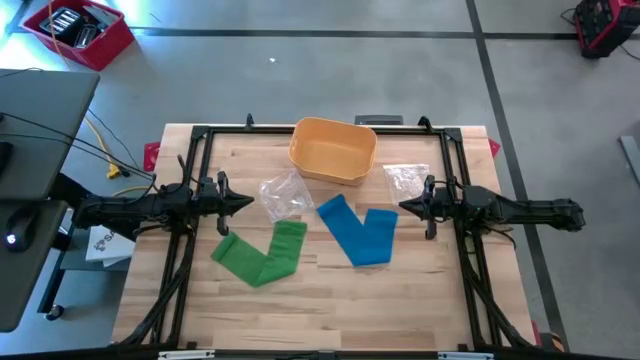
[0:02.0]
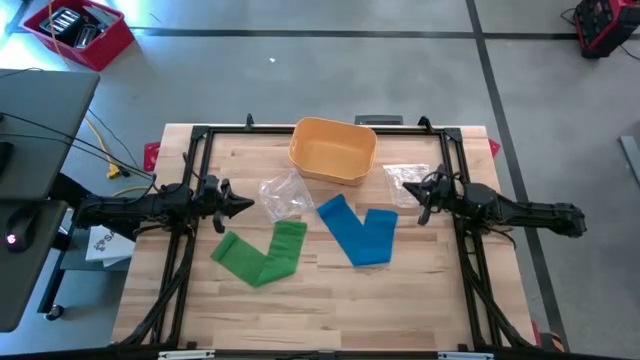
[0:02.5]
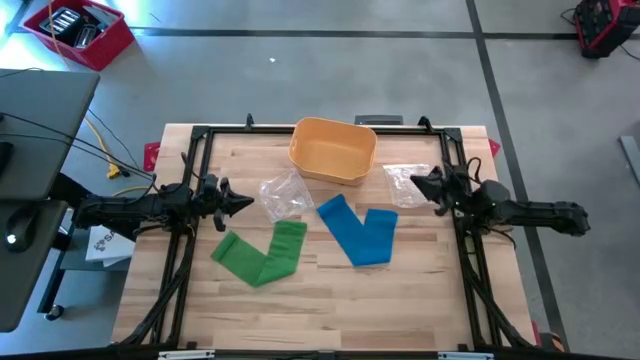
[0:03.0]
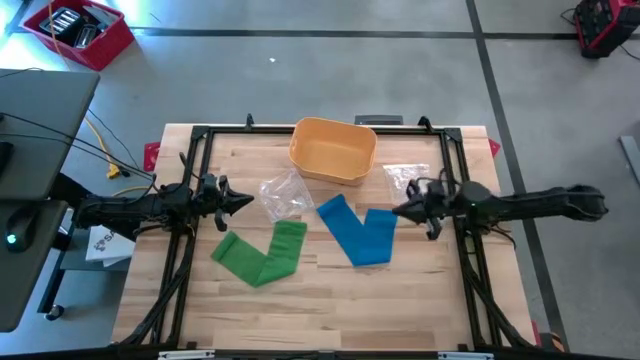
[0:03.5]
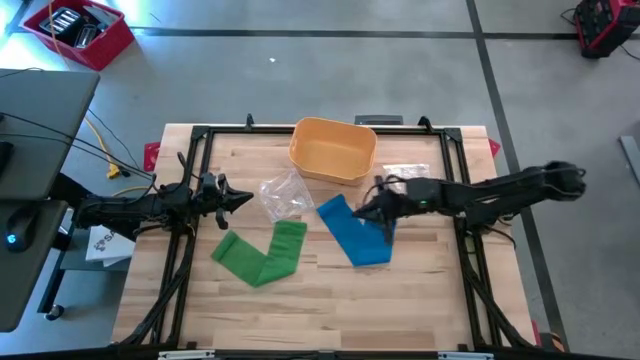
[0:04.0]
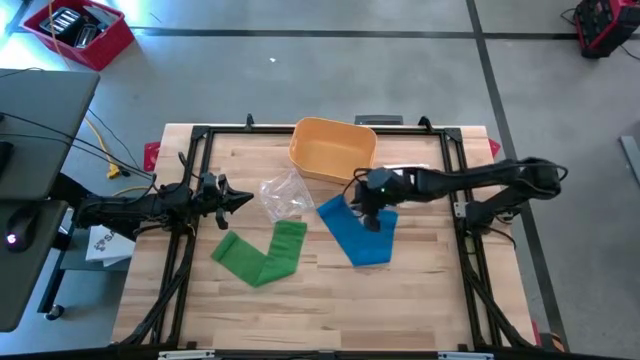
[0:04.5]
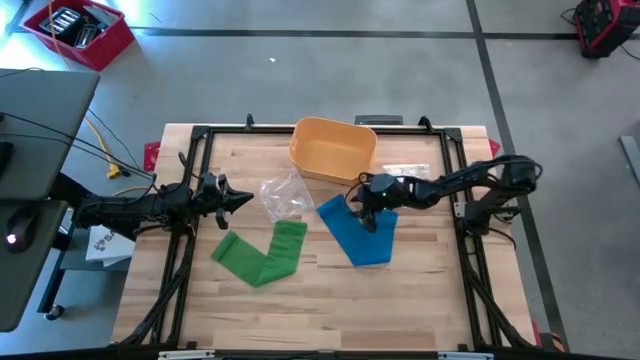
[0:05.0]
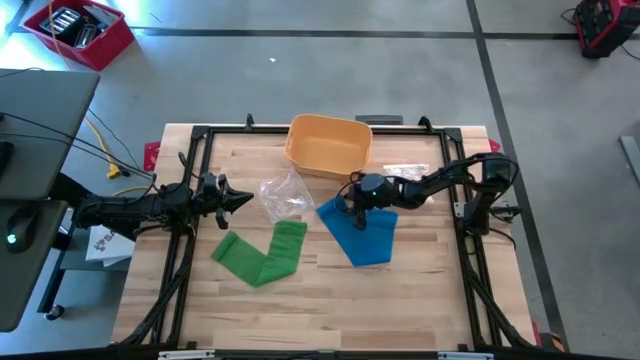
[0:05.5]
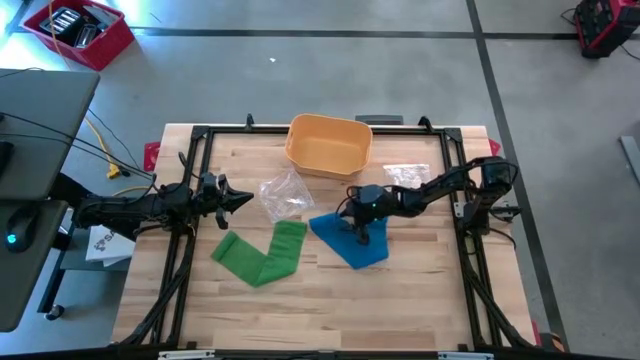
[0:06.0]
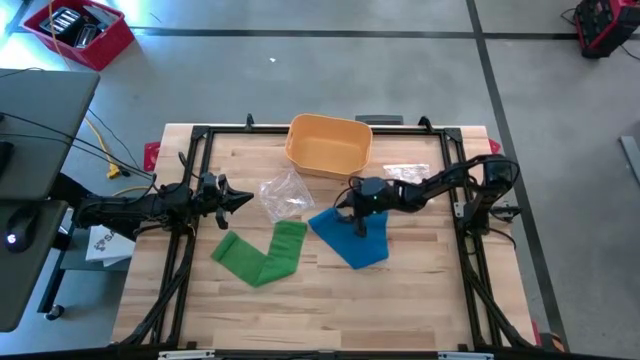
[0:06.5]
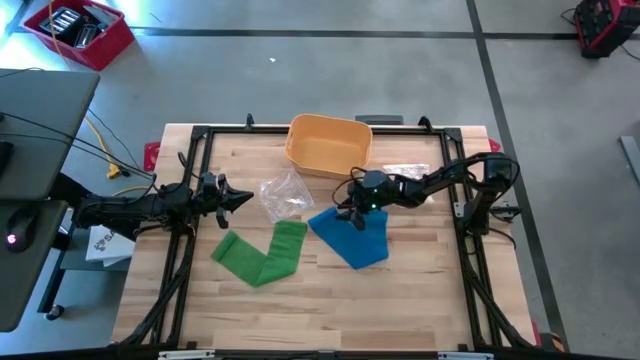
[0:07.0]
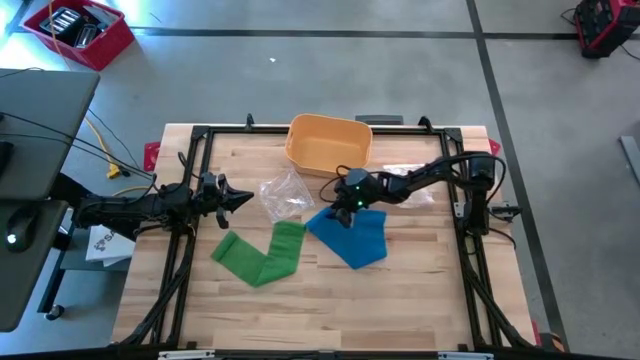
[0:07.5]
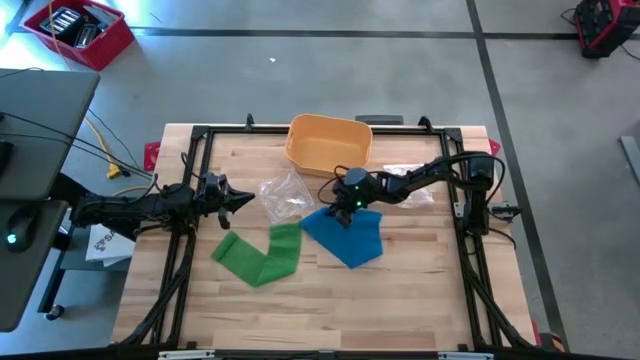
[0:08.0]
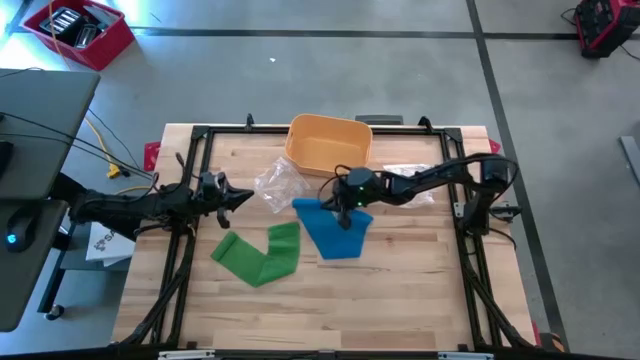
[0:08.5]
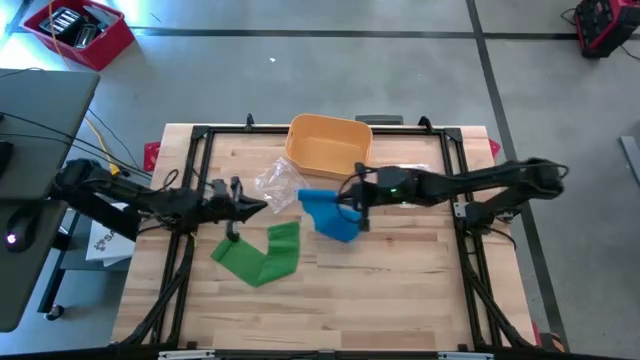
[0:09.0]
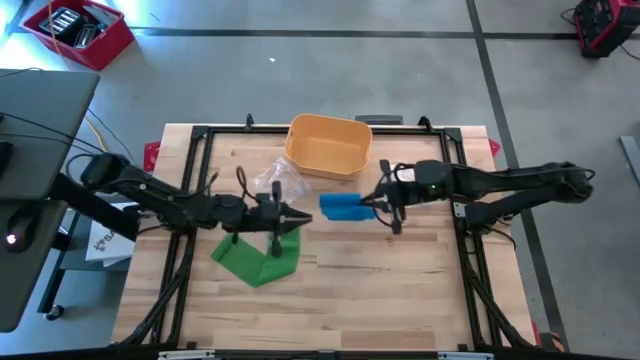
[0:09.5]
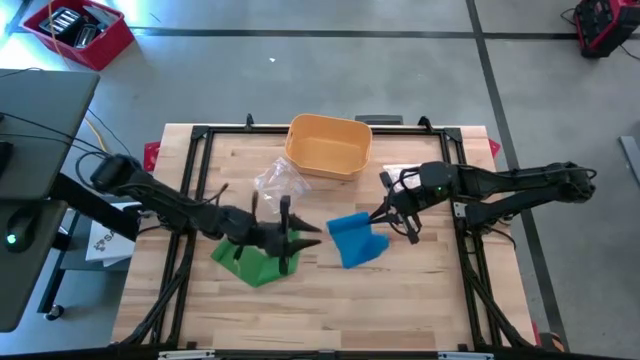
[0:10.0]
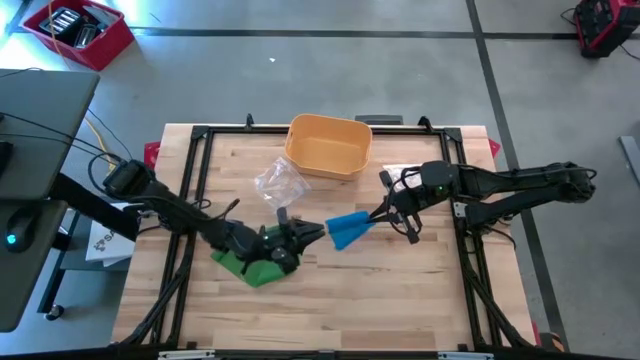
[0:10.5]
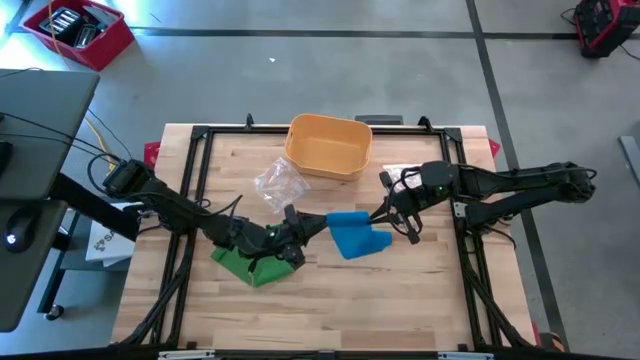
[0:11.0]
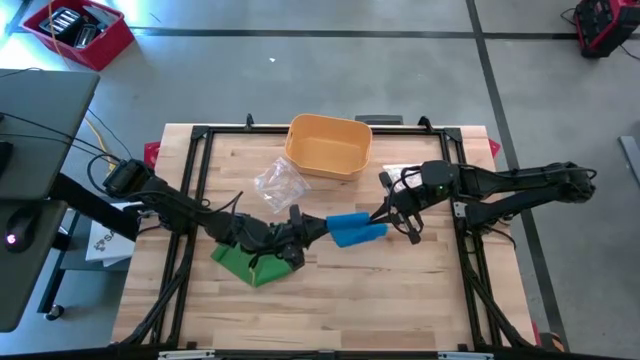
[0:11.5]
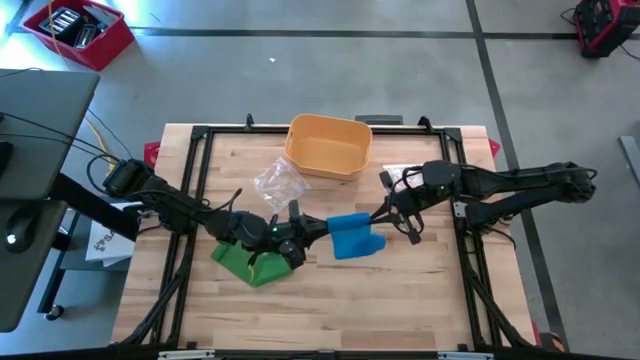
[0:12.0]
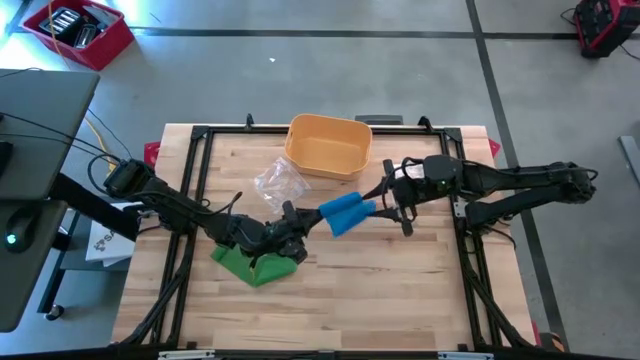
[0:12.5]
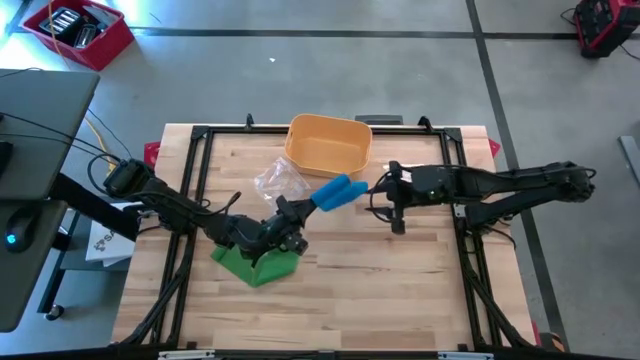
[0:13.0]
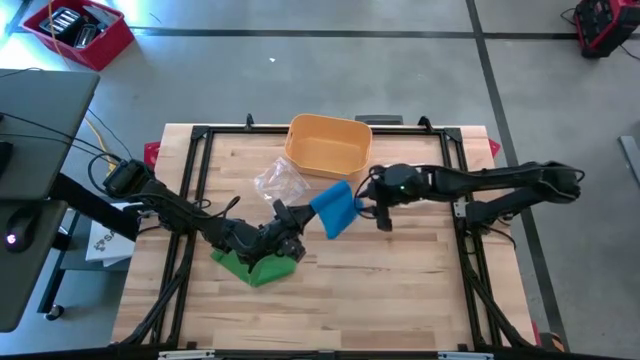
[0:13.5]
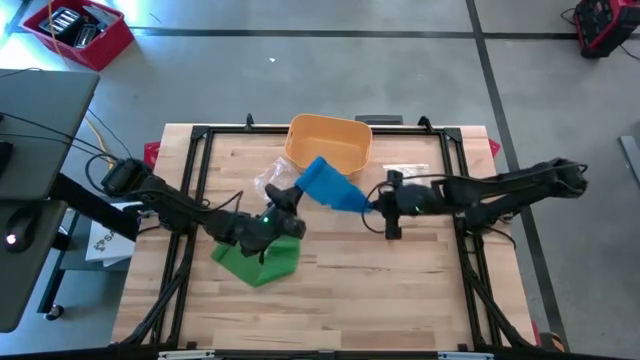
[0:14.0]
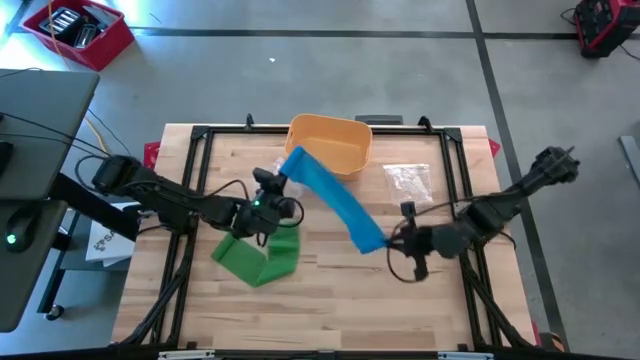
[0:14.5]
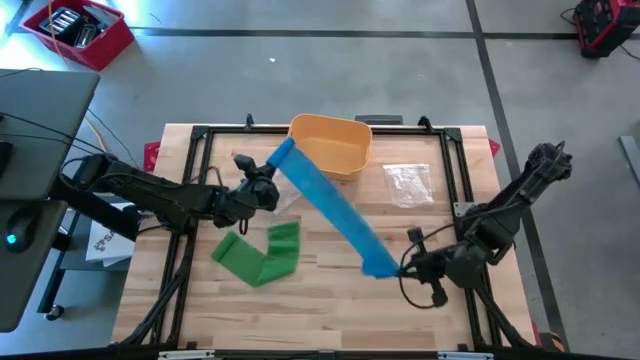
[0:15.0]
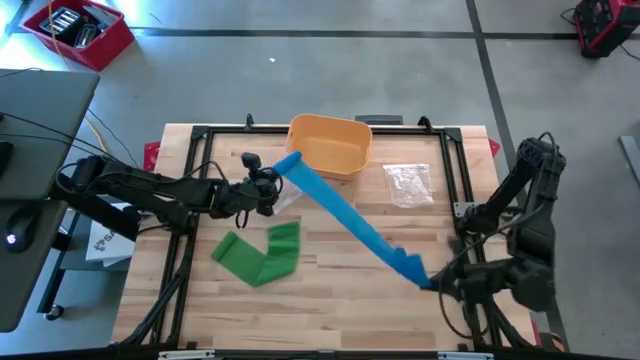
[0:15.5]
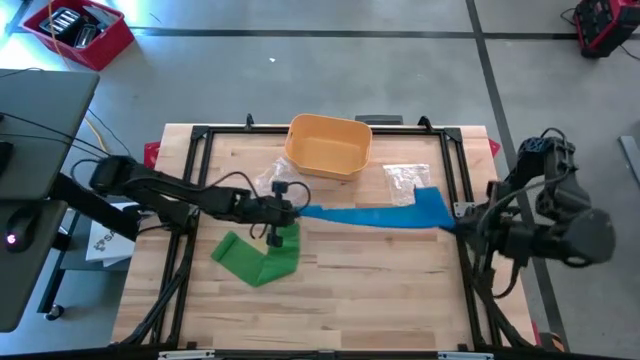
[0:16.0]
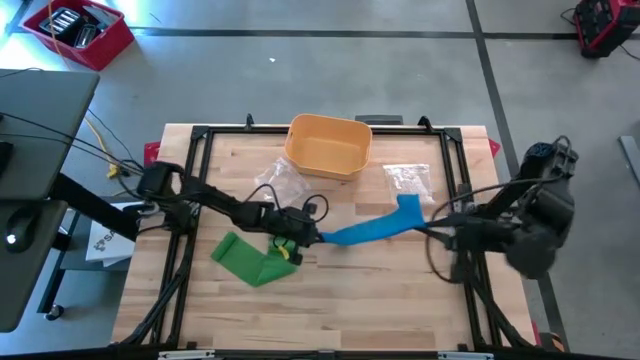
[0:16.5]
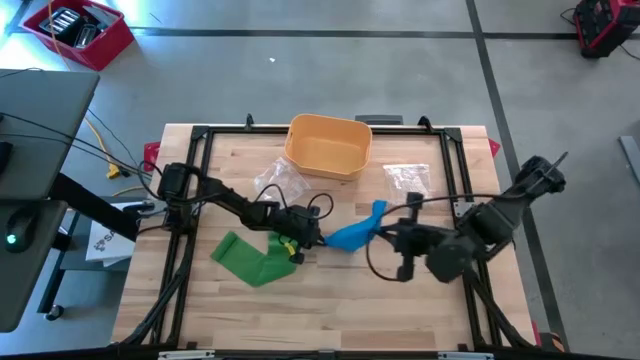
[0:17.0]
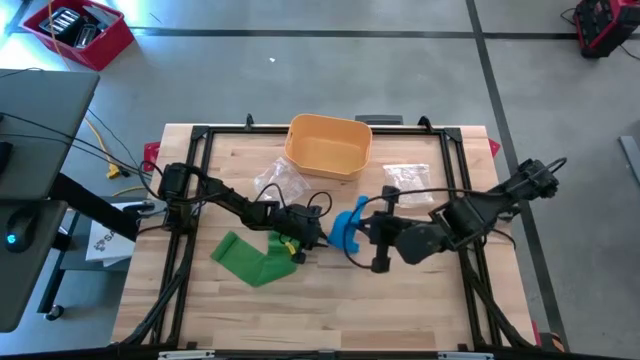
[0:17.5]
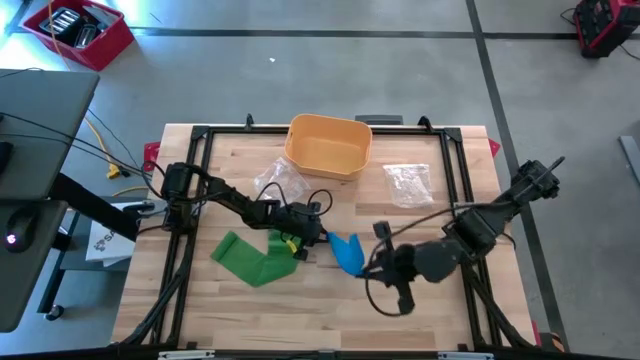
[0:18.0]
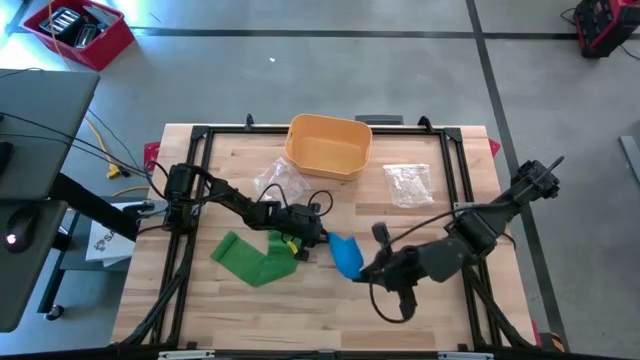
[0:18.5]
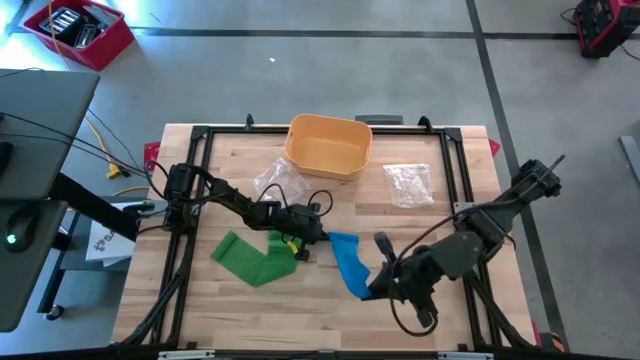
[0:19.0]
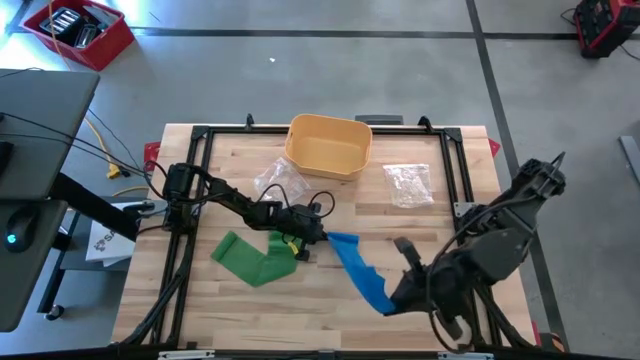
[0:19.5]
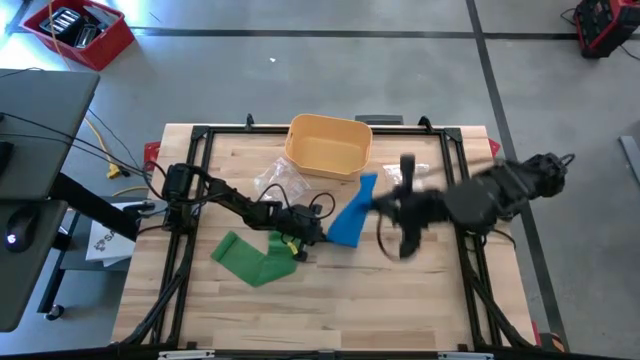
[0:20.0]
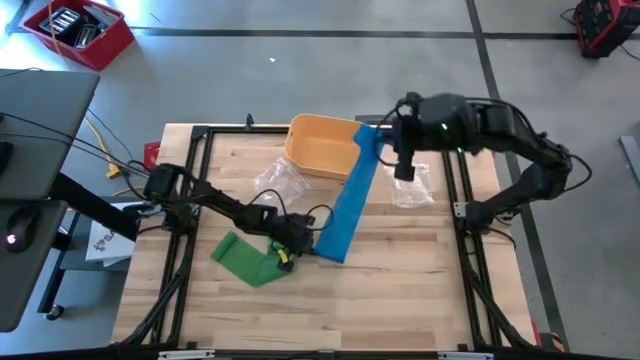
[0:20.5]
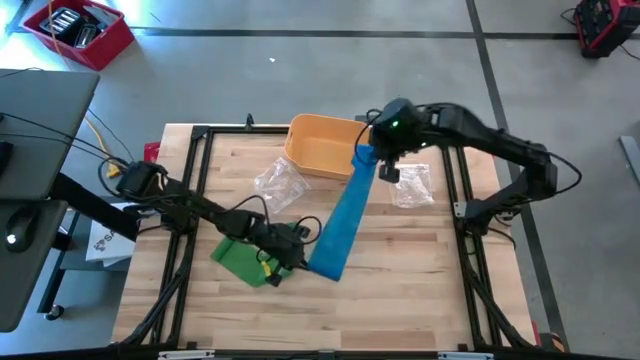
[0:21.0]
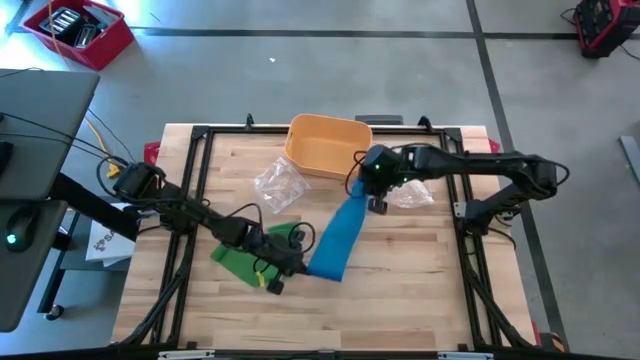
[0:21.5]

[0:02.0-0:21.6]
Task: Roll bandage
Roll the blue bandage
